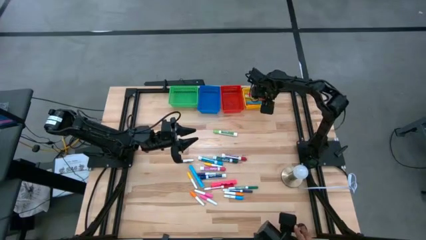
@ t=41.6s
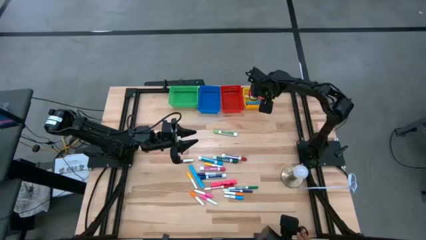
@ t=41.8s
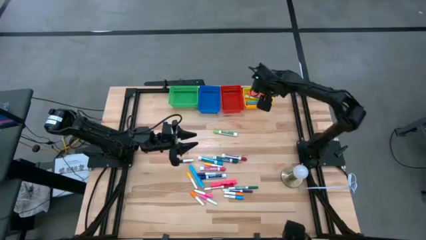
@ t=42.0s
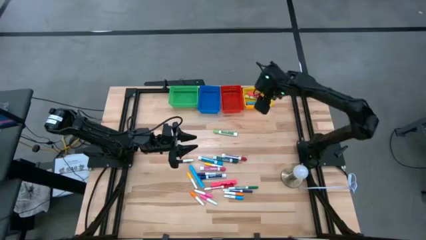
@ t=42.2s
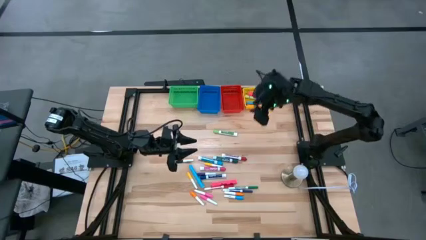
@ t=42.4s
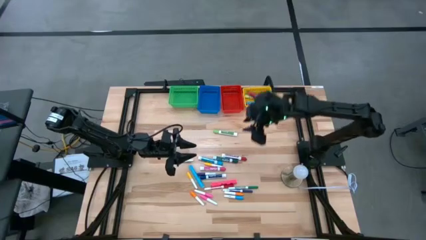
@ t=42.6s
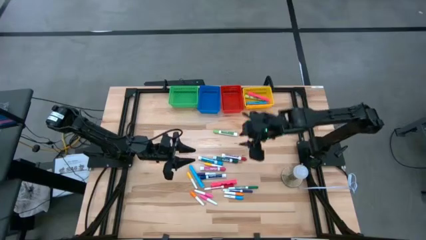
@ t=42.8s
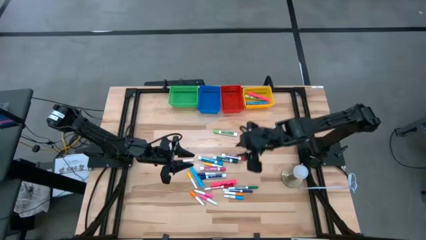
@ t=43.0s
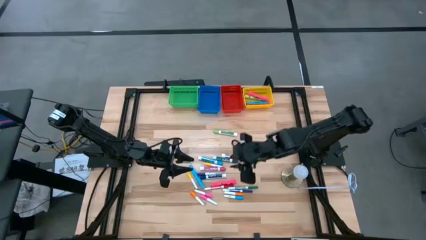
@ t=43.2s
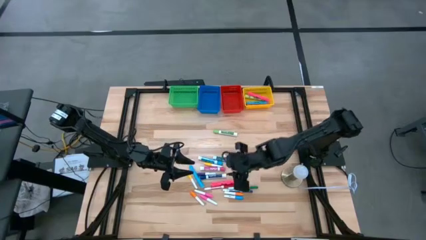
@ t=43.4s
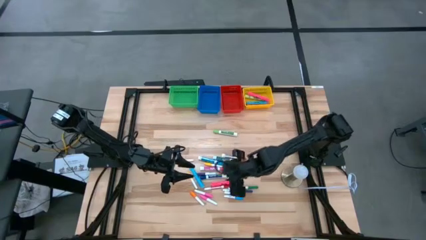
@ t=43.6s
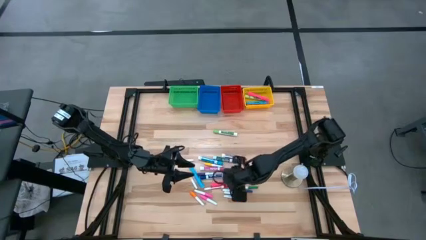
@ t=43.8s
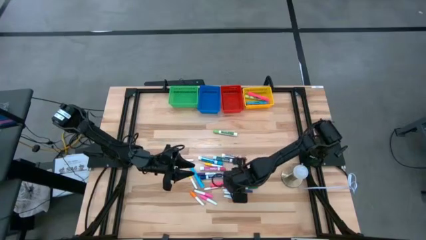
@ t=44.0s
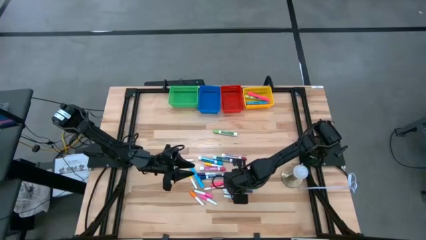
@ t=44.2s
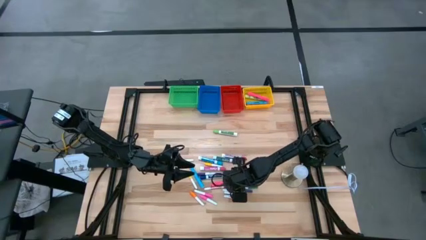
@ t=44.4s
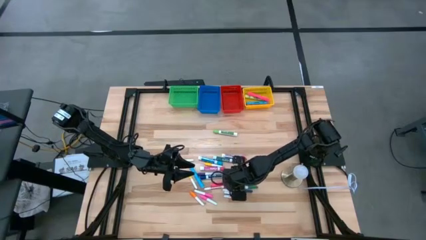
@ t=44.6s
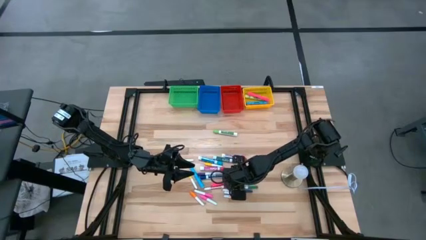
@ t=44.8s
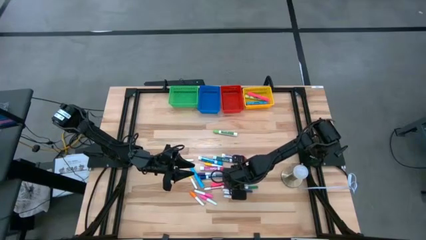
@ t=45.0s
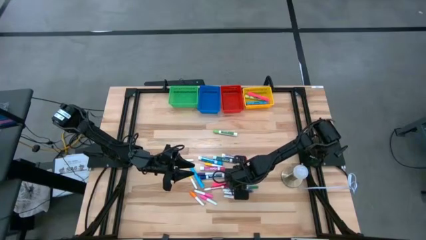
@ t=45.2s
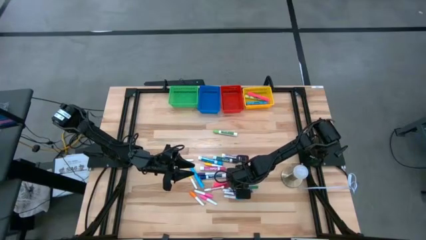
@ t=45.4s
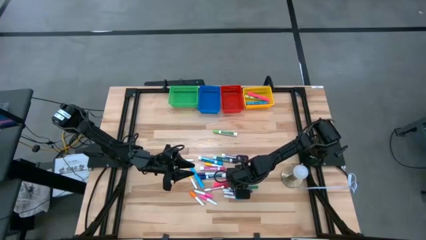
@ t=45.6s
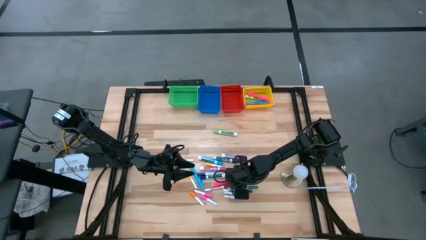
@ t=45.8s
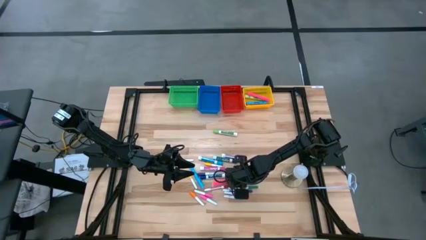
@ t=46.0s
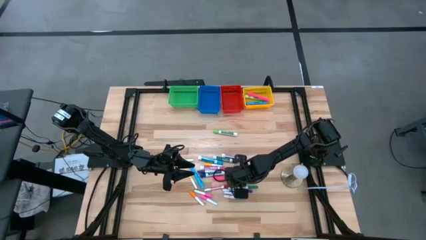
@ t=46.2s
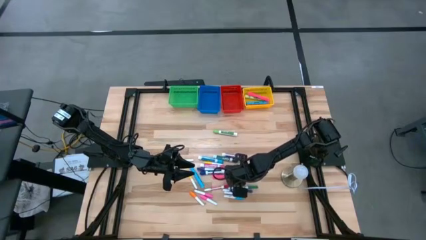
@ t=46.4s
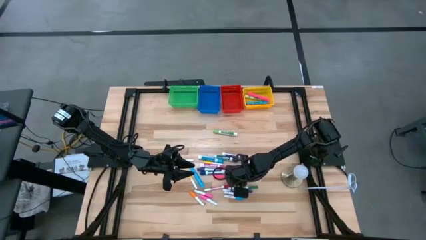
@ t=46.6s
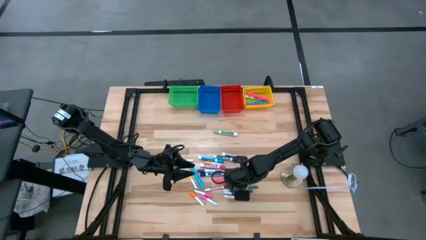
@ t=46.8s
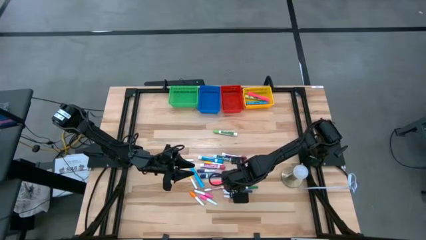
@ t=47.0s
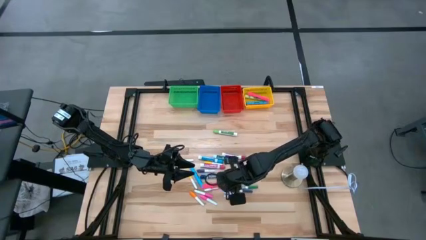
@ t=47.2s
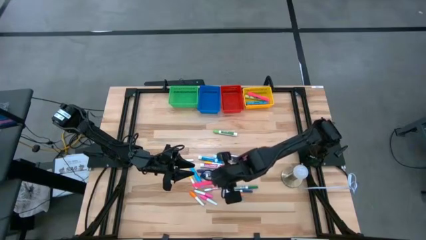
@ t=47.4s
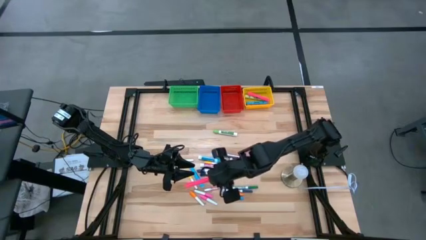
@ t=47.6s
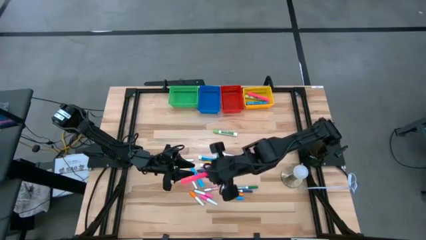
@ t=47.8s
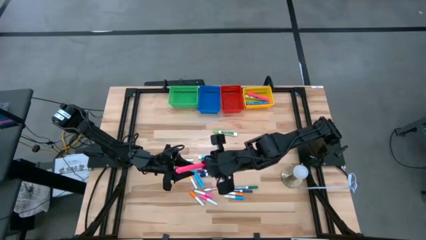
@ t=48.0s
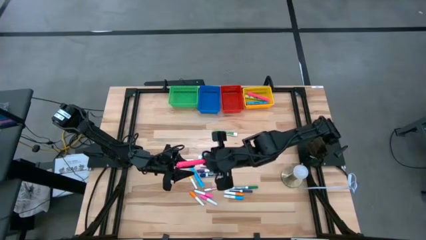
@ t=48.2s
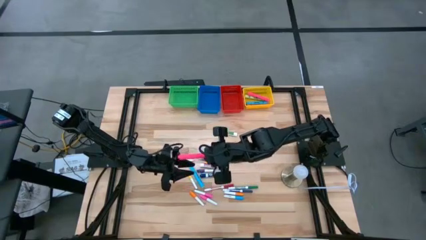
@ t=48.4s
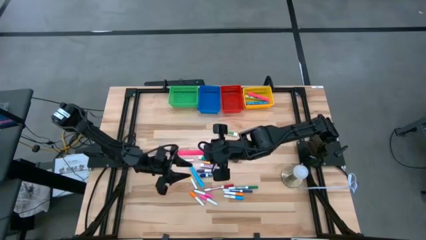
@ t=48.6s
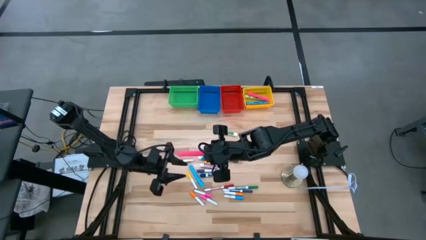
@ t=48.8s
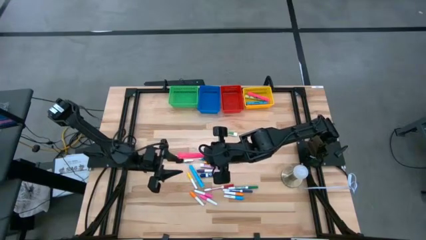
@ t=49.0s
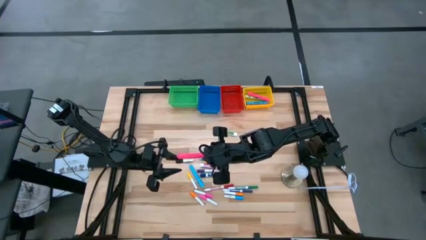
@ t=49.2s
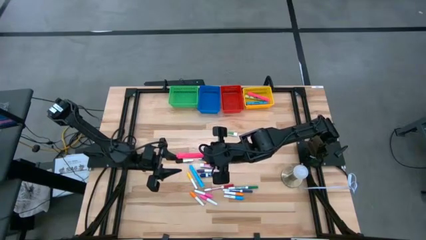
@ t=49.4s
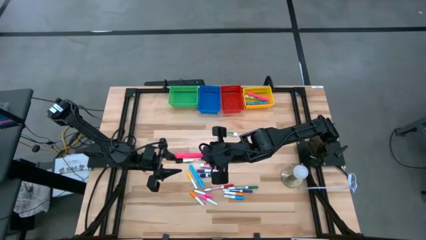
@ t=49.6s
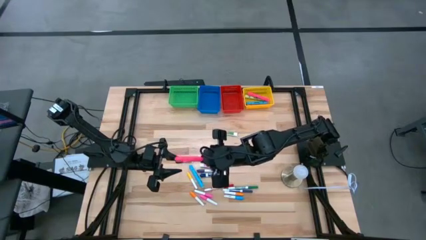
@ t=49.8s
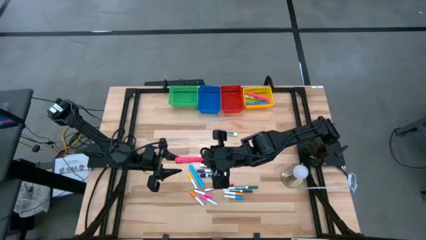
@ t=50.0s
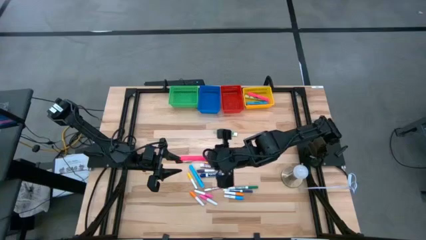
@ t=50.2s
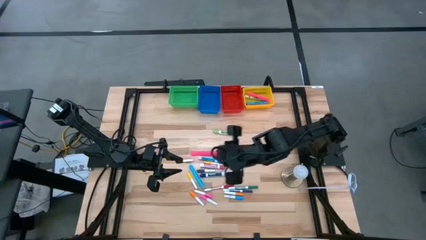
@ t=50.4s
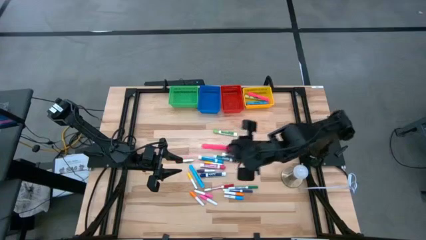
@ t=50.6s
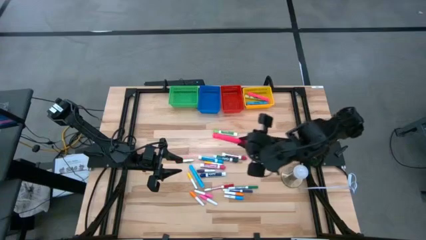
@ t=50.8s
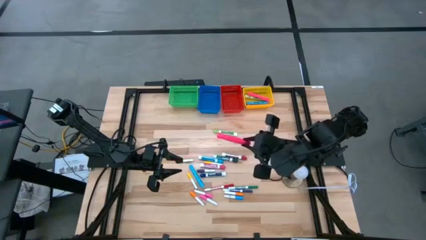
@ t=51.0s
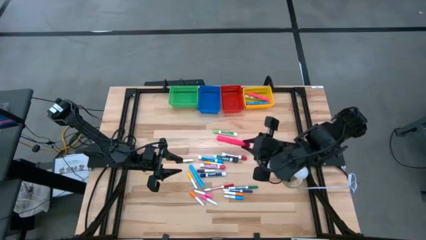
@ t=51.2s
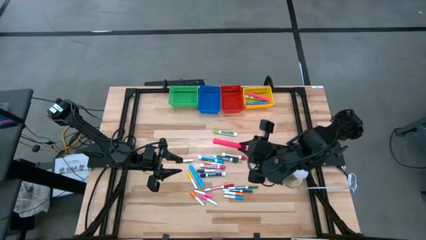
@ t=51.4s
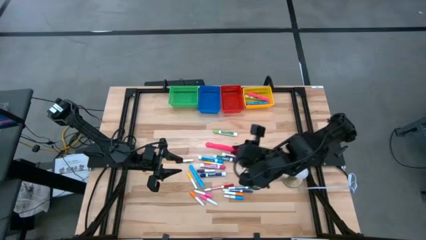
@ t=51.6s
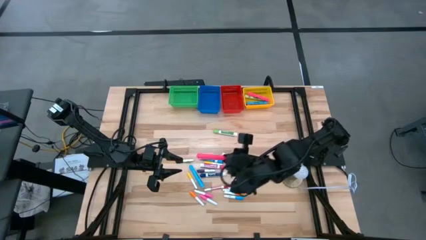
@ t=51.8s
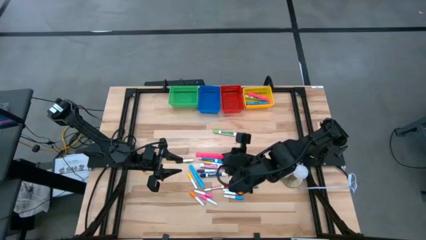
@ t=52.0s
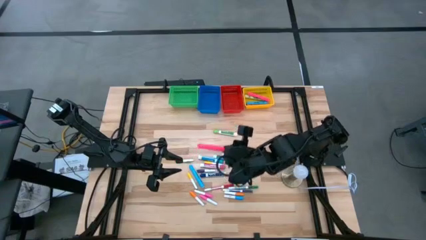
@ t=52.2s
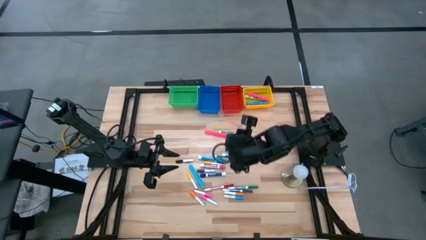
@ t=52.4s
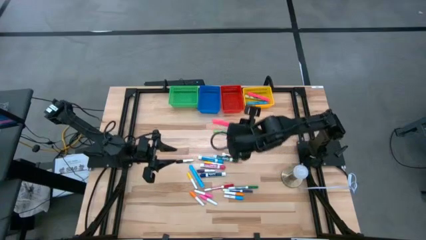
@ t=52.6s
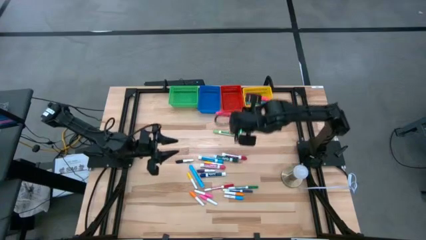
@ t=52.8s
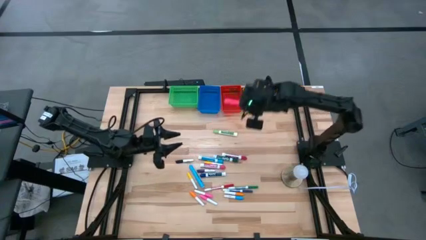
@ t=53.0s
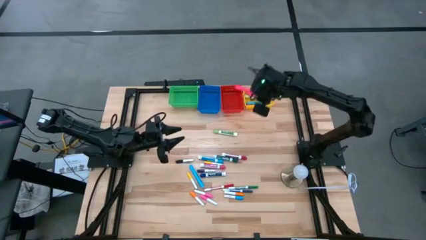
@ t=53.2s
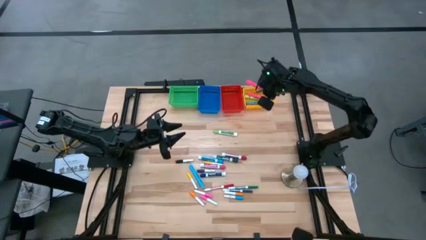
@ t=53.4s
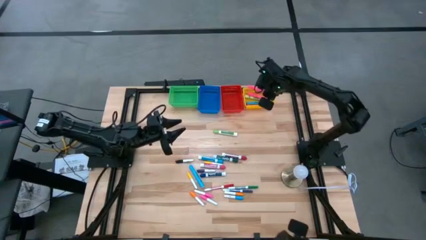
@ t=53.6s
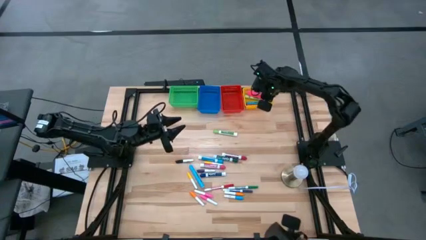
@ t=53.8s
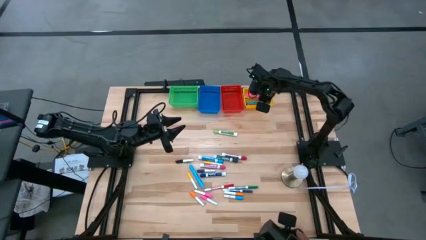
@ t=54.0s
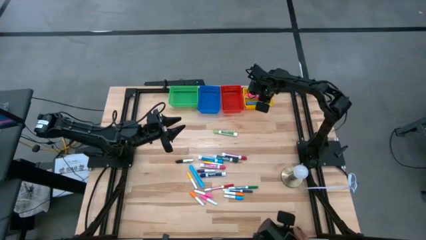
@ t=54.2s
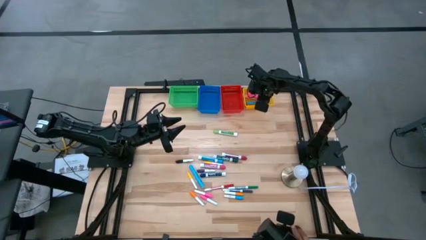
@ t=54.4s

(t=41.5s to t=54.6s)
Task: Pick & Place Markers
Put the large pink highlighter pen into the yellow bin

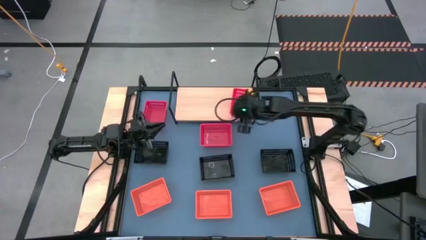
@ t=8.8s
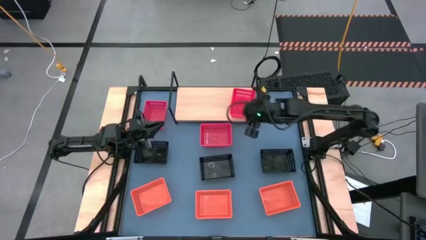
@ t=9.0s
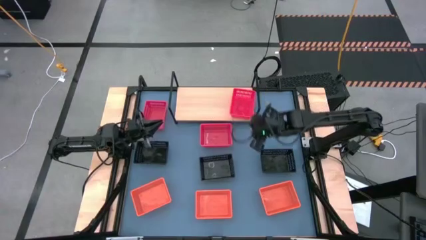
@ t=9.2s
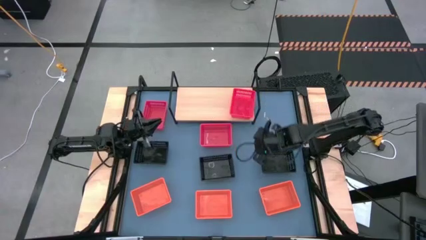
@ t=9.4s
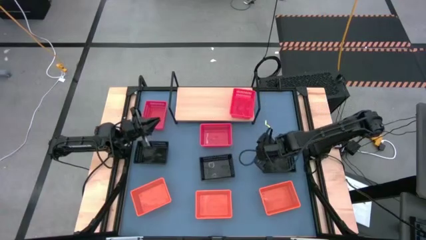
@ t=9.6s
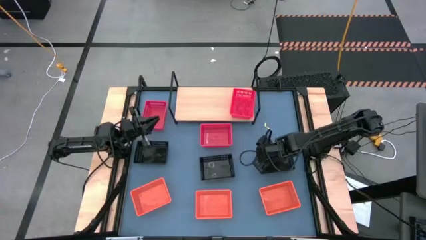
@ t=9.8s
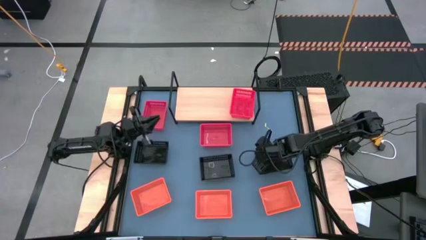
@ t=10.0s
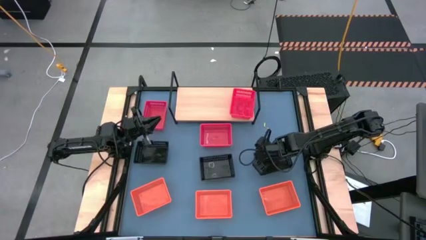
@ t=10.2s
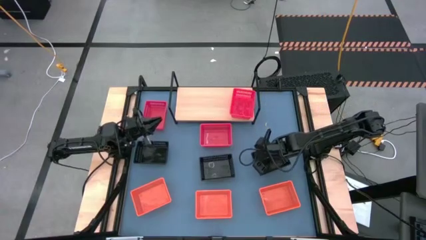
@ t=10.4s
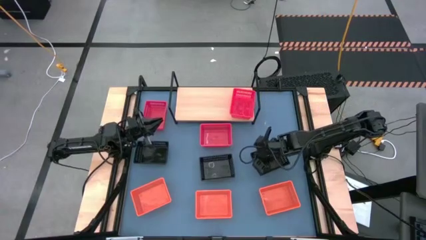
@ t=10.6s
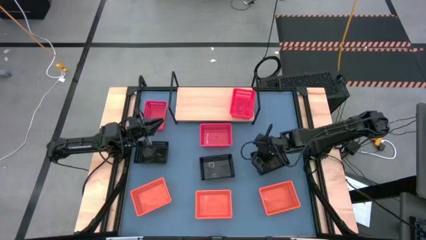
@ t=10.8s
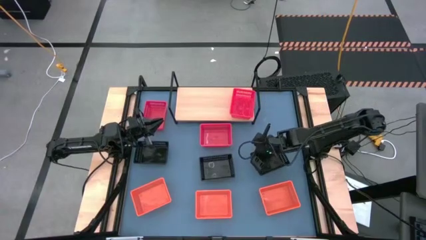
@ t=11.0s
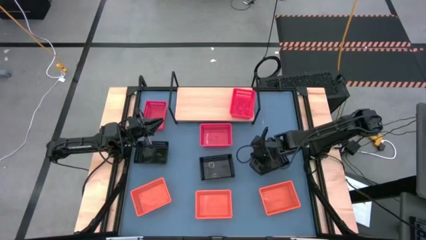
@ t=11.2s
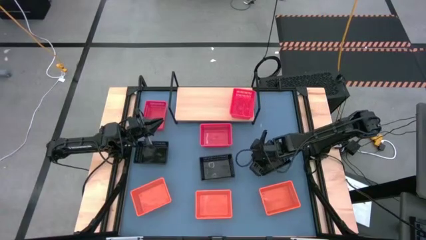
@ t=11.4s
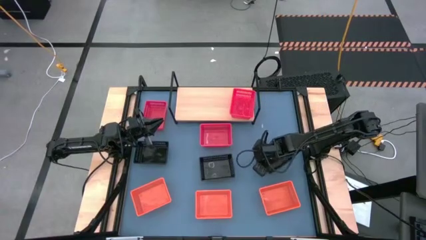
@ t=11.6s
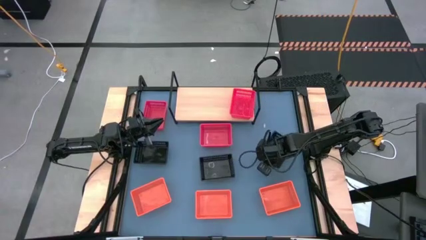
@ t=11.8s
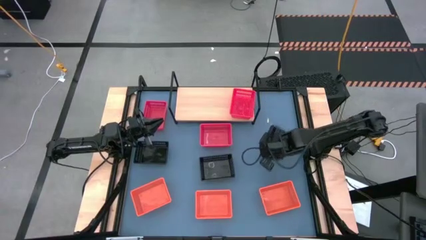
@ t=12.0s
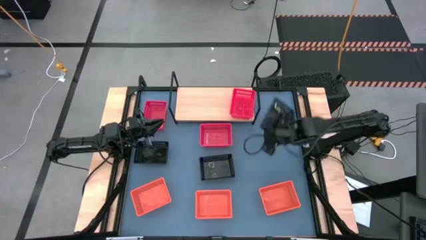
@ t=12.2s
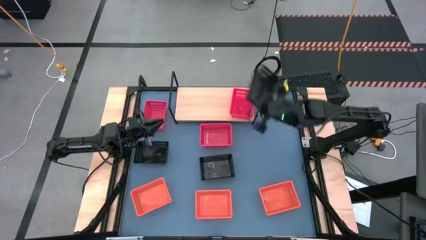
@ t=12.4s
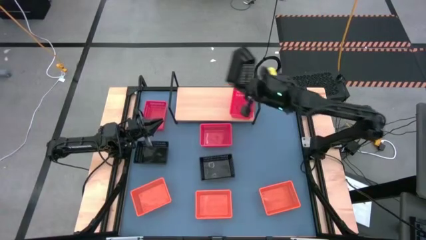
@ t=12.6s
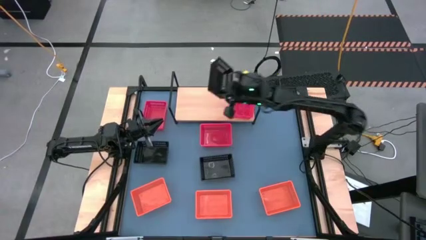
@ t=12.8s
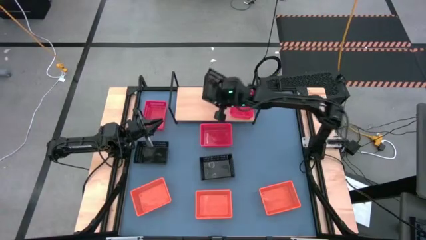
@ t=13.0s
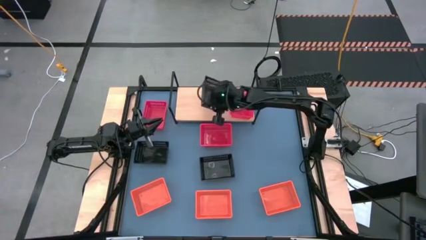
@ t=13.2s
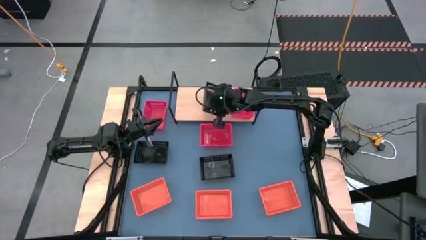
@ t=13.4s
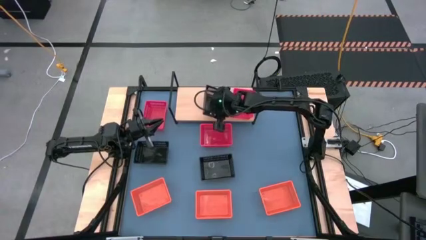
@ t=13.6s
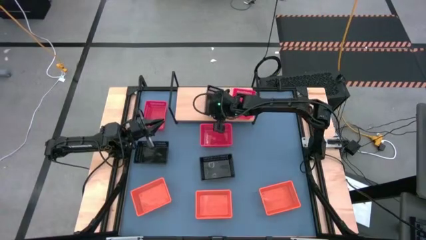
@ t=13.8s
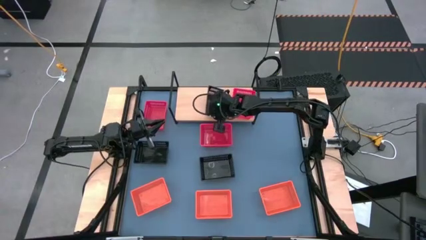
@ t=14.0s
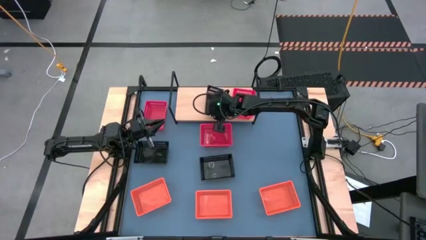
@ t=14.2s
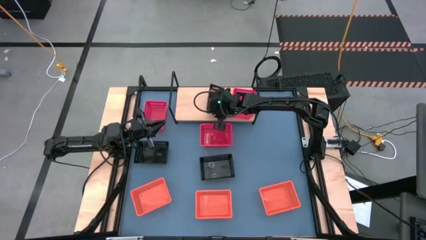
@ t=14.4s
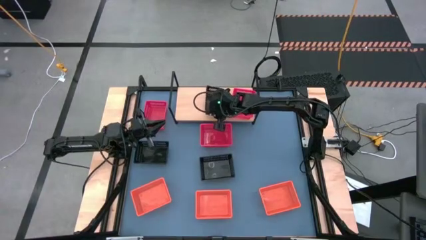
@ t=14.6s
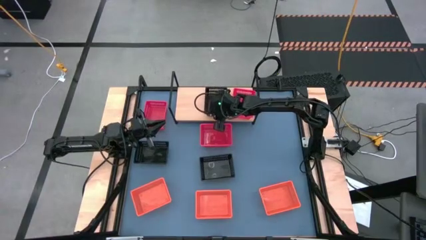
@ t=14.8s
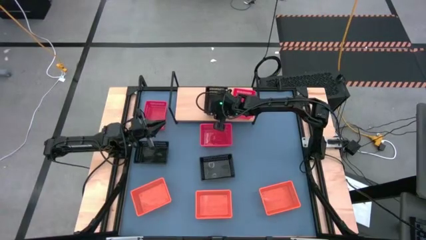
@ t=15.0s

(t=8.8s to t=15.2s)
Task: Stack baskets on shelf by color
Put the middle right black bin on the shelf
